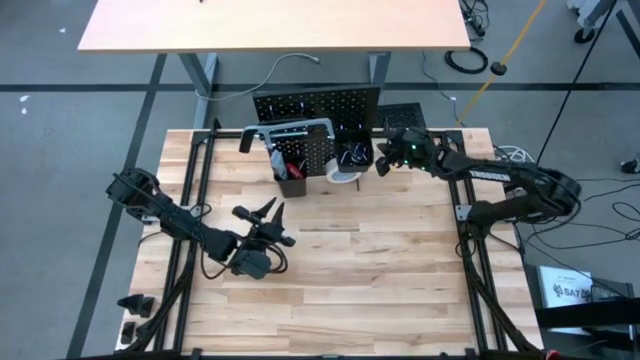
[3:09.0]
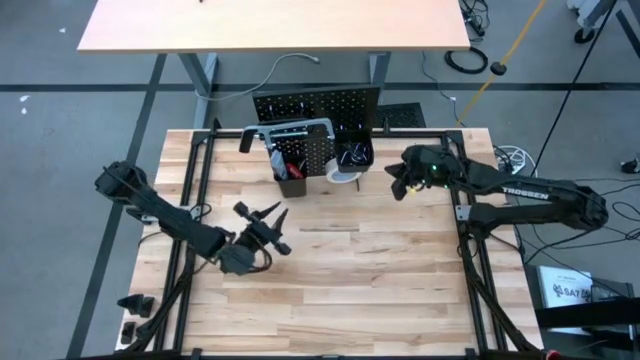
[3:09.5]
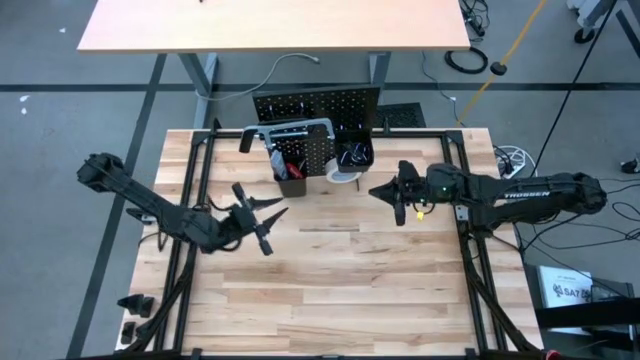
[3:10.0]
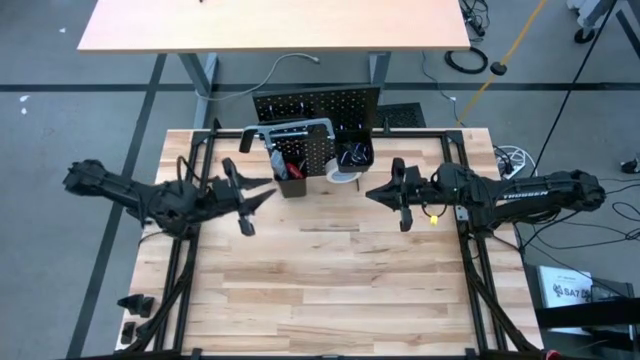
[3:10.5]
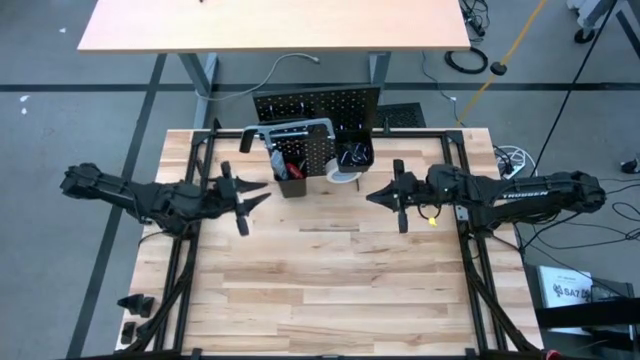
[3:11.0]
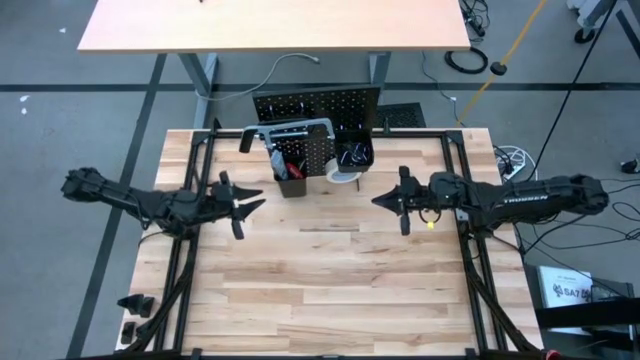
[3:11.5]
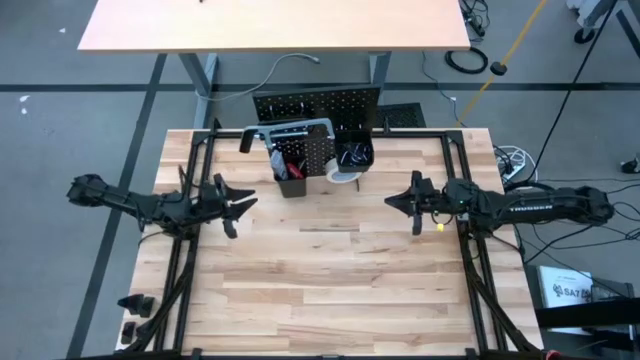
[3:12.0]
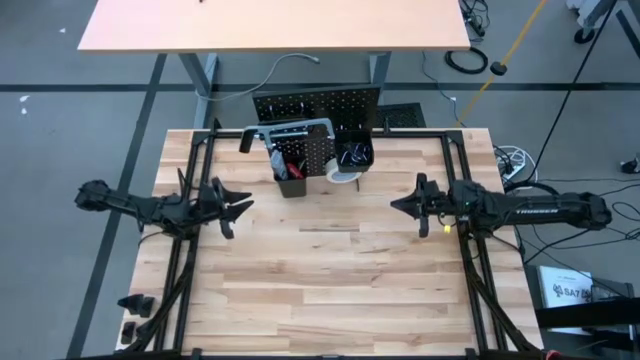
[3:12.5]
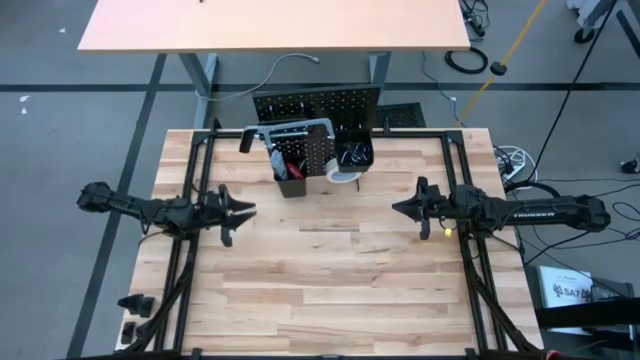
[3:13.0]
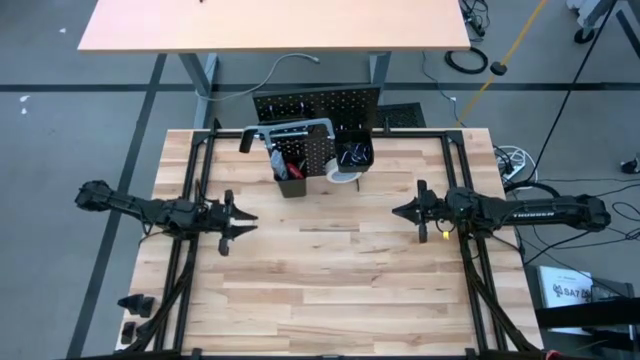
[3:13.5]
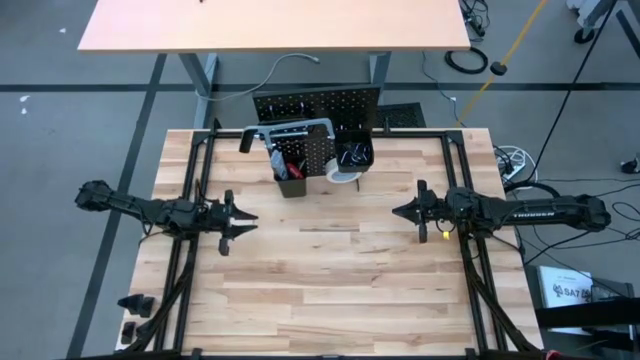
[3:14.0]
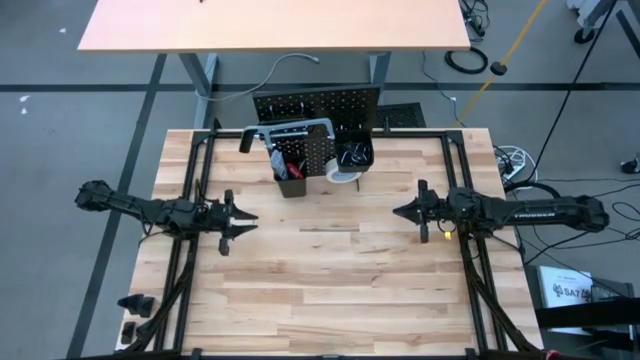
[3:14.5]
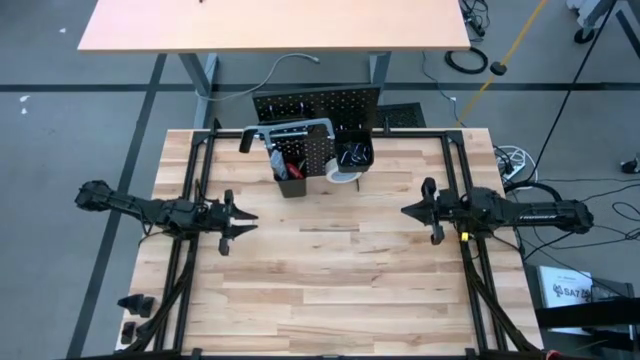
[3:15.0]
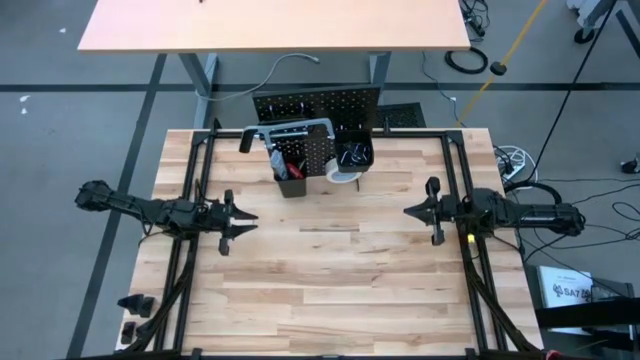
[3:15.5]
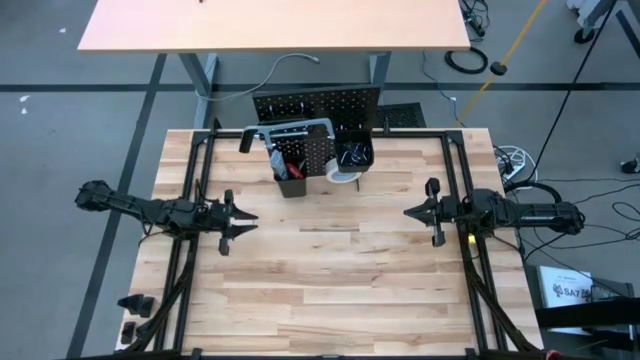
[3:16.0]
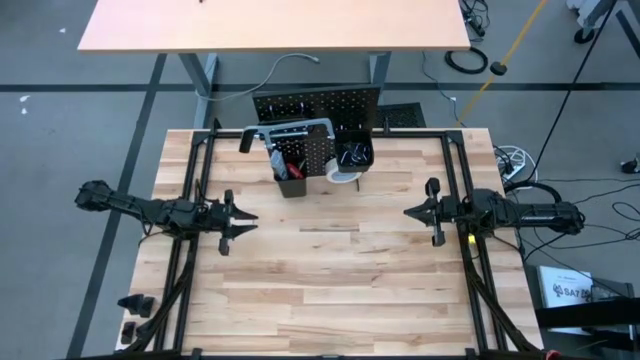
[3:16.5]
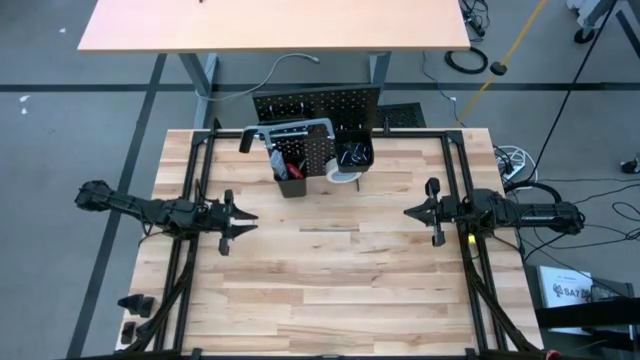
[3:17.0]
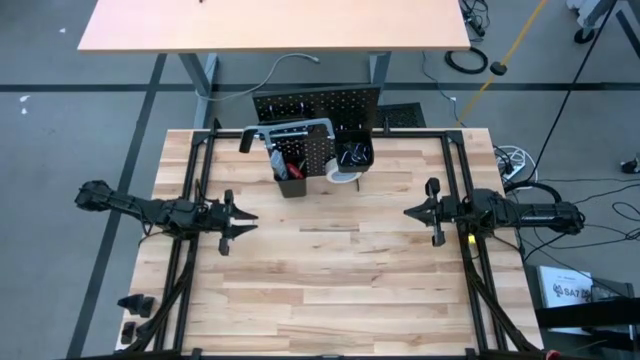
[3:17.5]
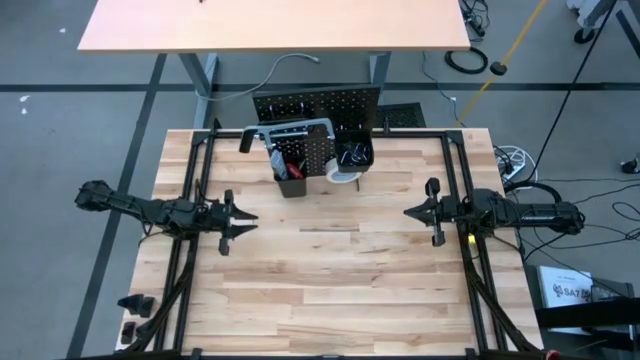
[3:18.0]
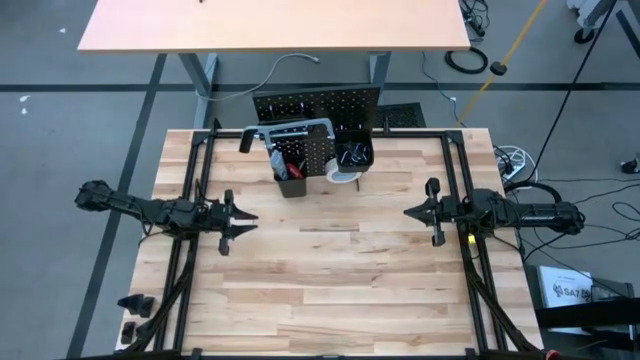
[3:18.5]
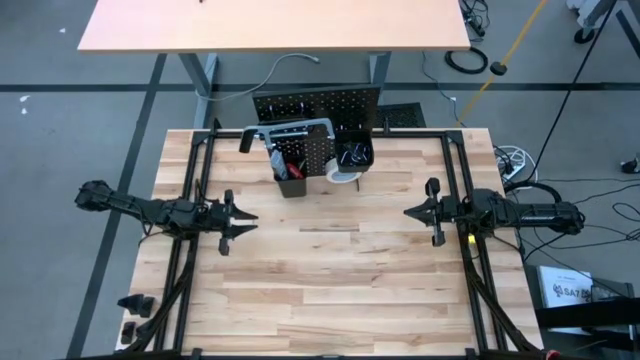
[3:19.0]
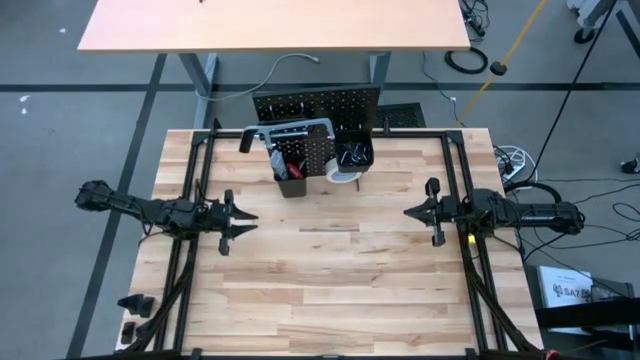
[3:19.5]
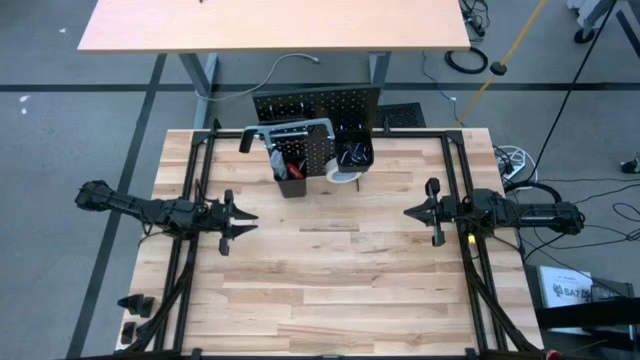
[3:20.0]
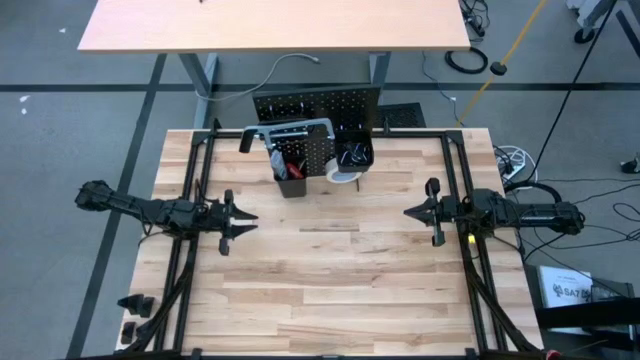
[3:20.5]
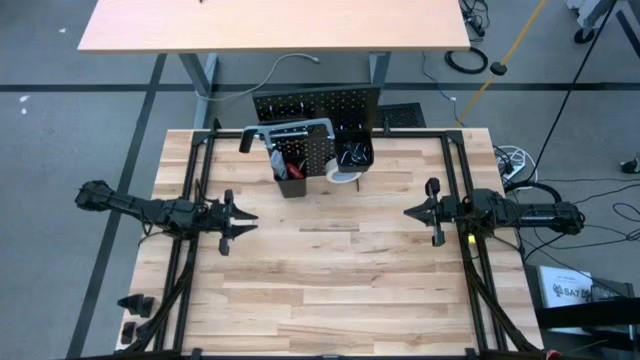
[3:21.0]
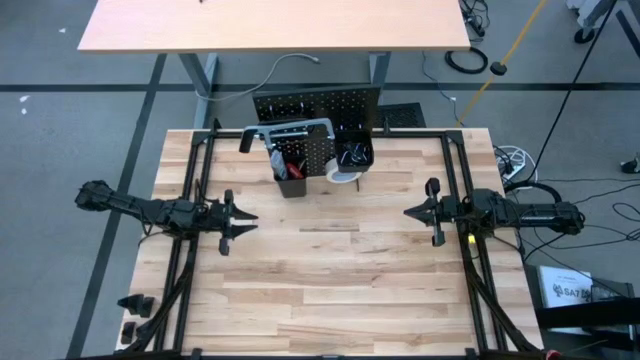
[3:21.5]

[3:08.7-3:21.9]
Task: Hang tools onto peg board
Return to Home Position

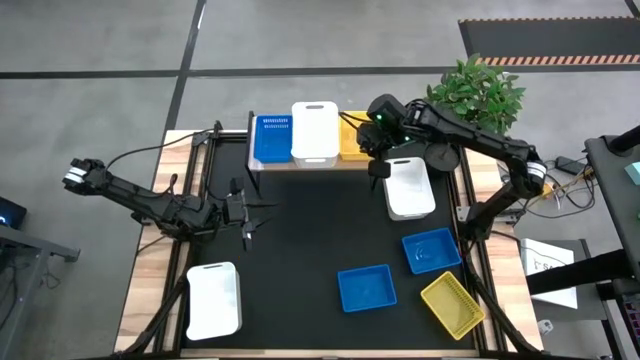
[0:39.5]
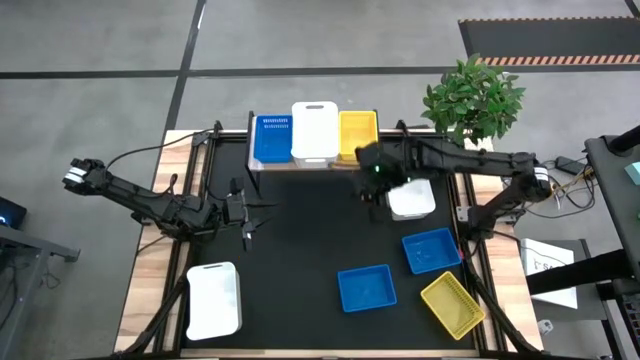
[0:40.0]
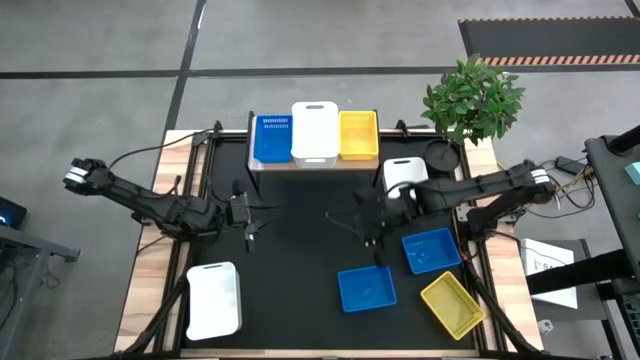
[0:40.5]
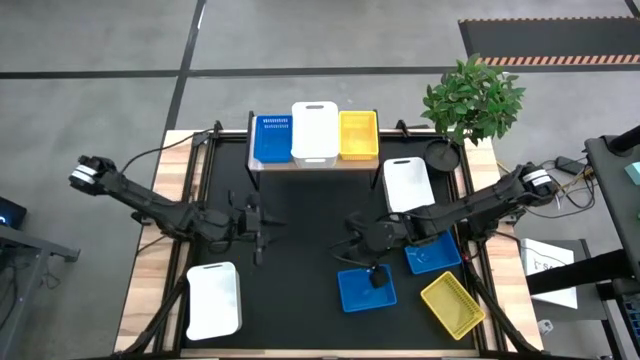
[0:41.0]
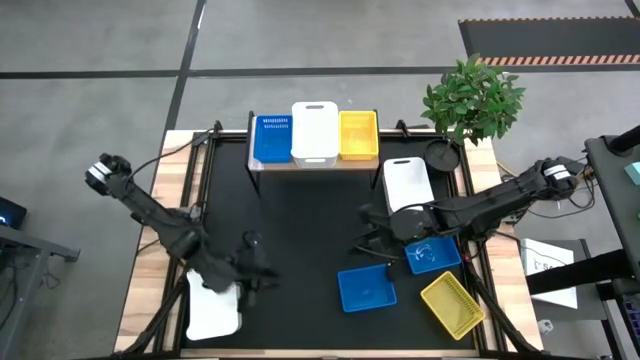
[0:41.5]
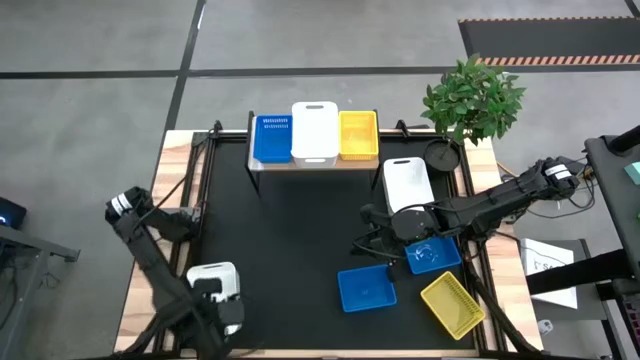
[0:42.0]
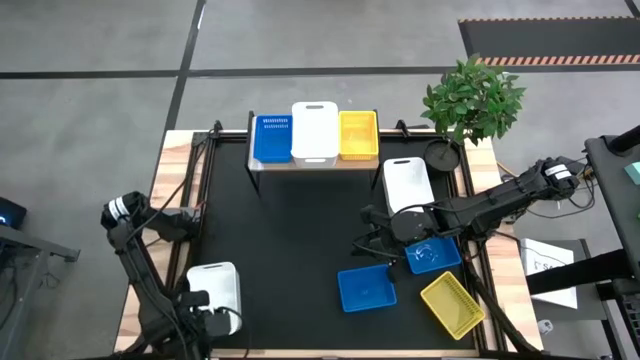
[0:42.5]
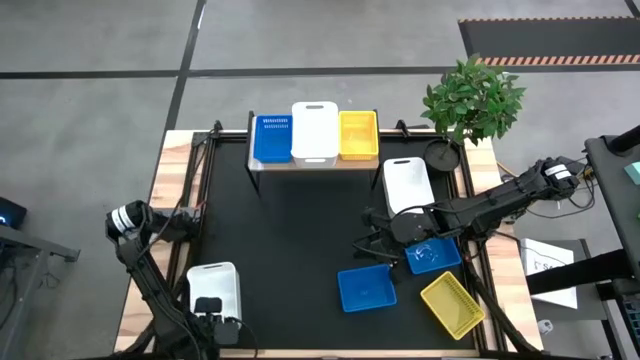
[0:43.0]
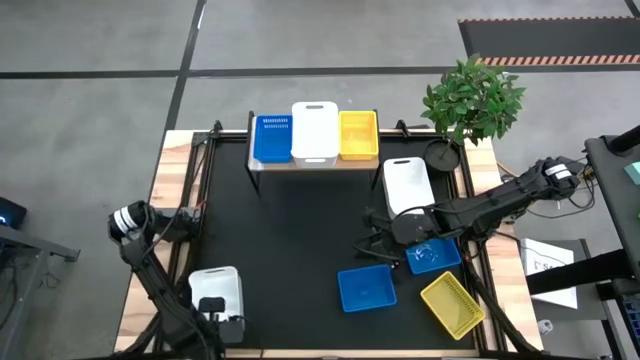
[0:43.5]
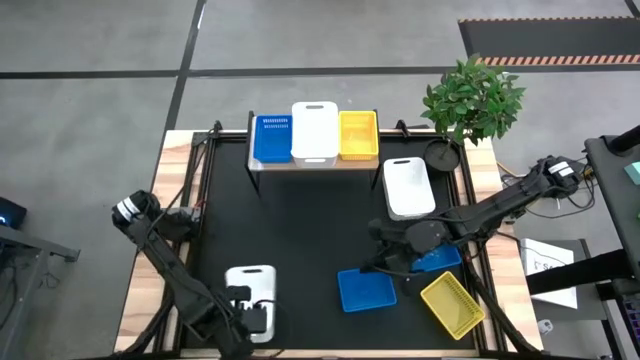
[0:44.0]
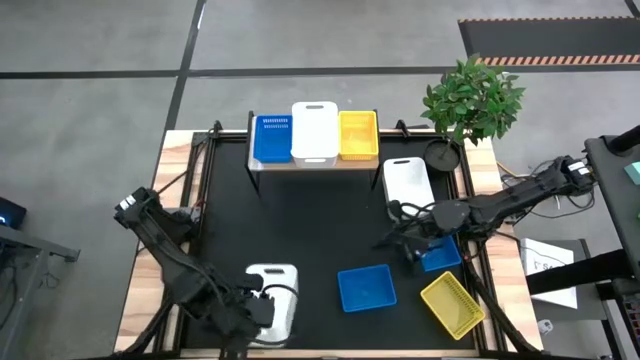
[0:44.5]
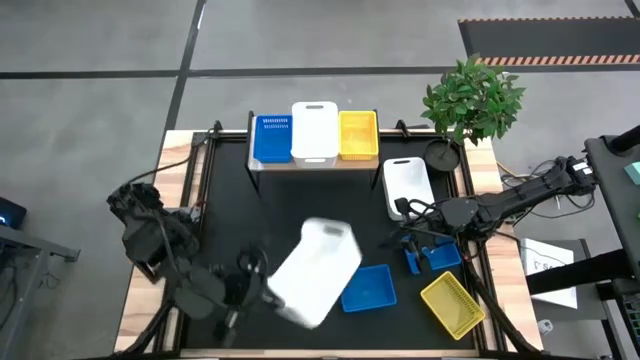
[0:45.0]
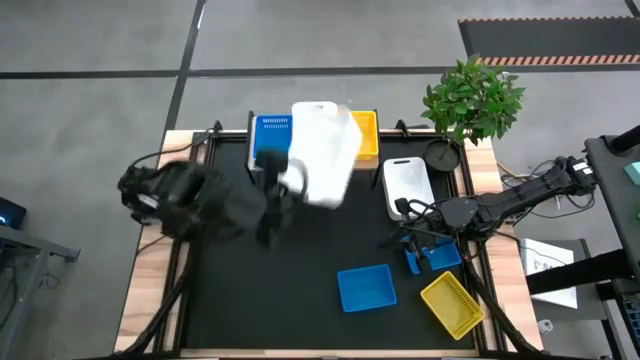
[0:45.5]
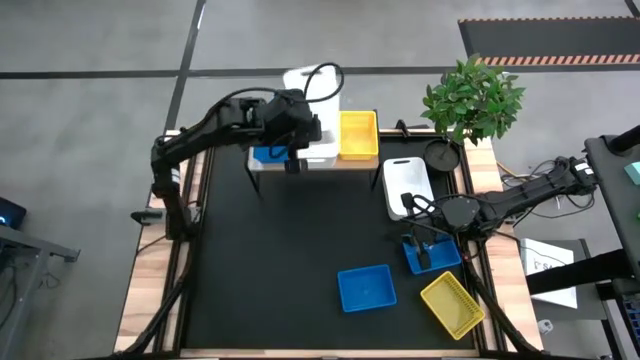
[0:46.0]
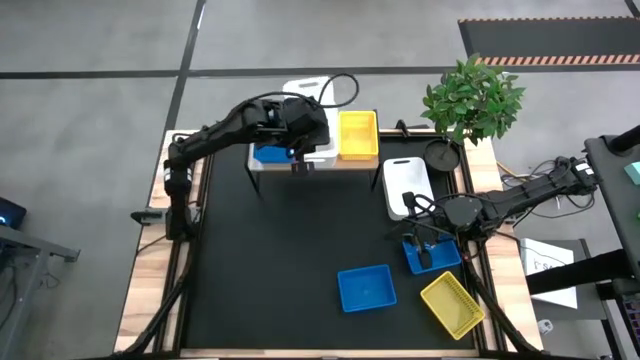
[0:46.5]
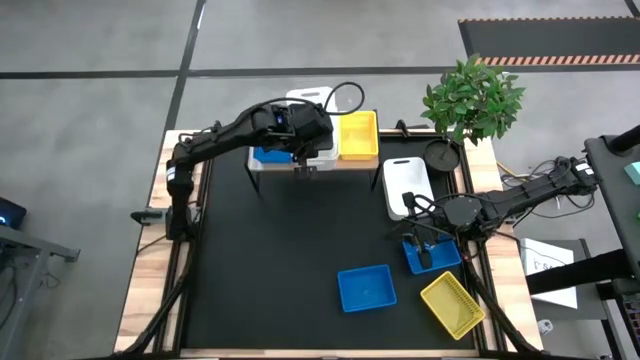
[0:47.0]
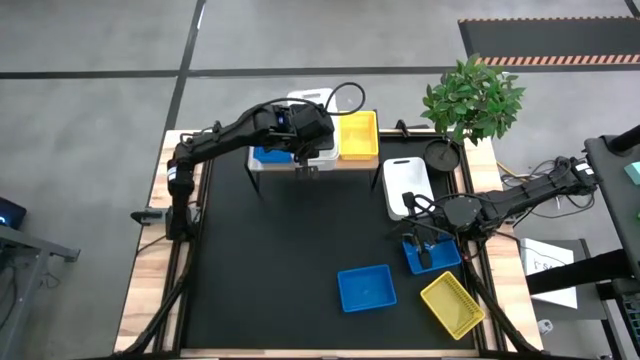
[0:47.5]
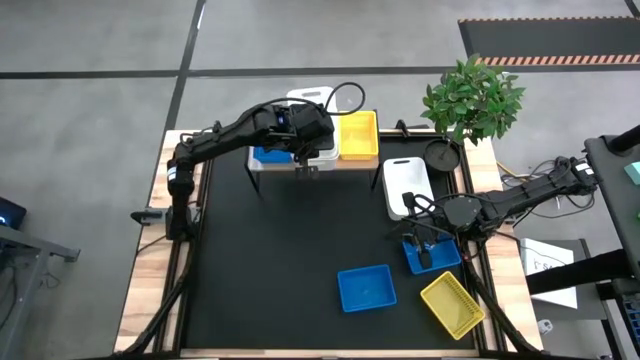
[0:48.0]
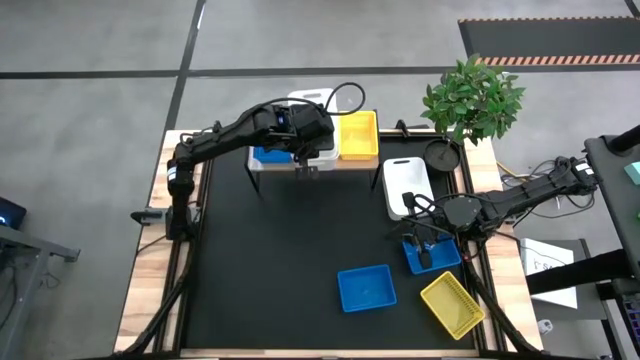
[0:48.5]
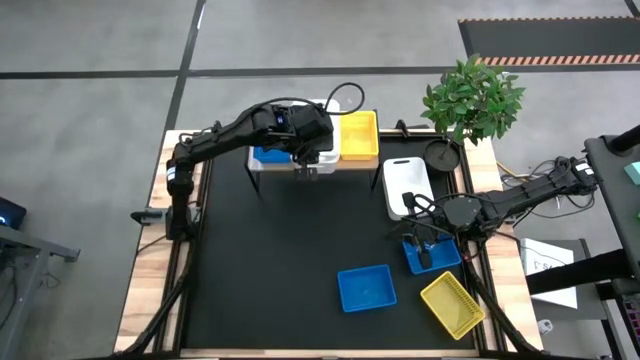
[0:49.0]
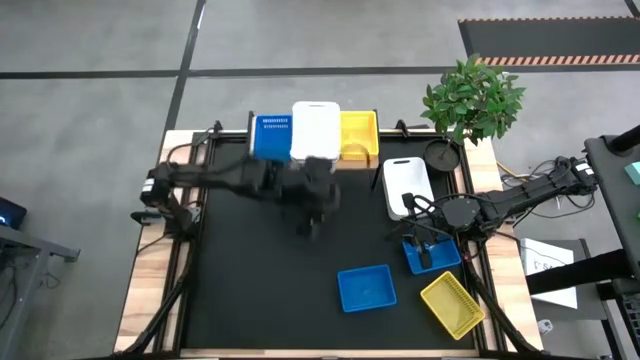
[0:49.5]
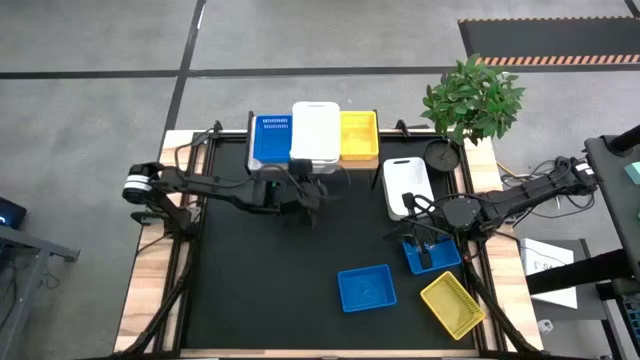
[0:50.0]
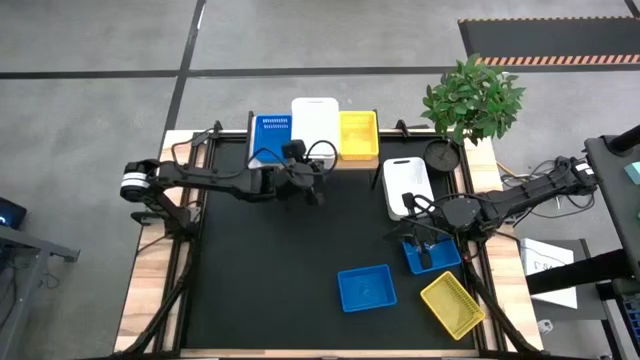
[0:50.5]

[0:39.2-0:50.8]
Task: Stack baskets on shelf by color
Stack the bottom white bin on the white bin on the shelf
